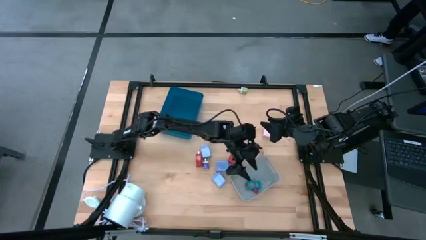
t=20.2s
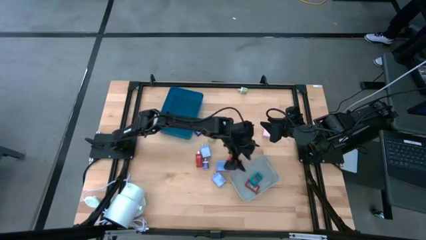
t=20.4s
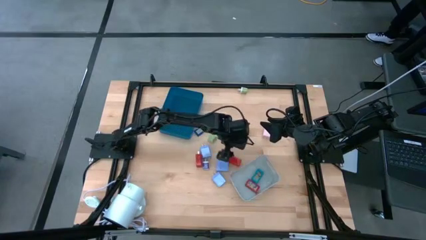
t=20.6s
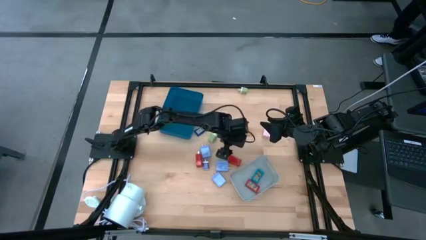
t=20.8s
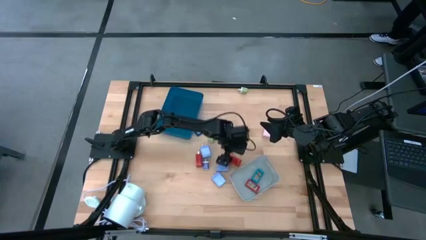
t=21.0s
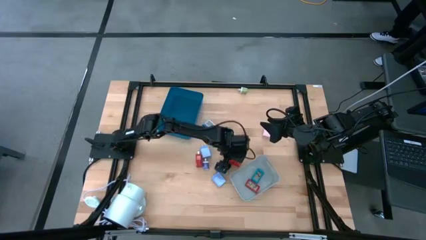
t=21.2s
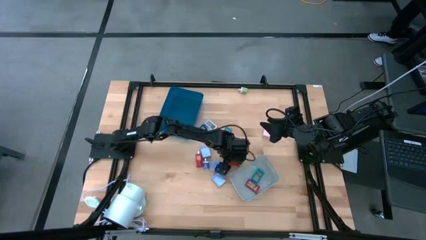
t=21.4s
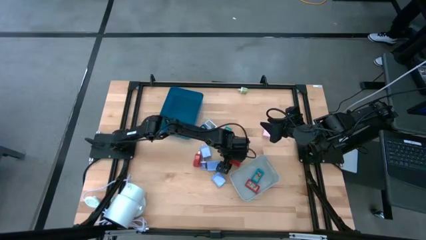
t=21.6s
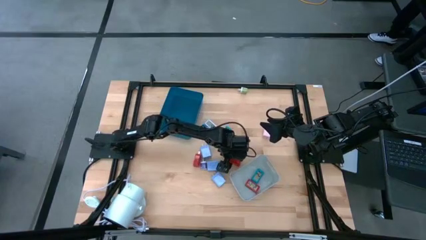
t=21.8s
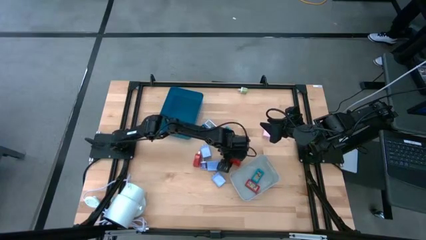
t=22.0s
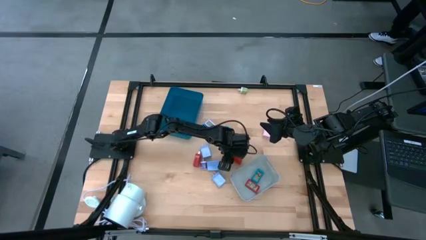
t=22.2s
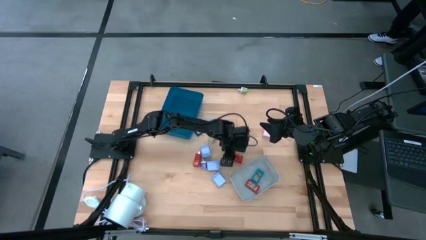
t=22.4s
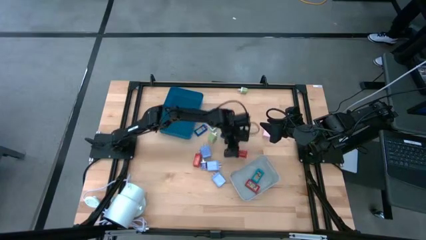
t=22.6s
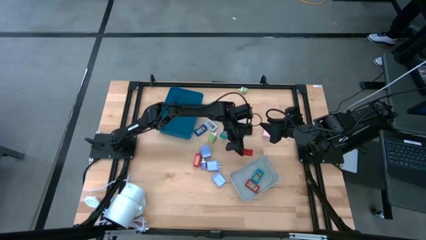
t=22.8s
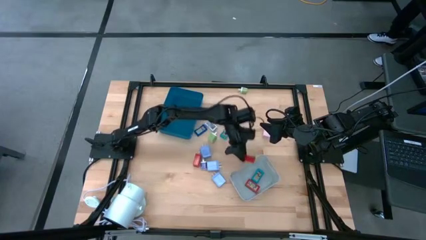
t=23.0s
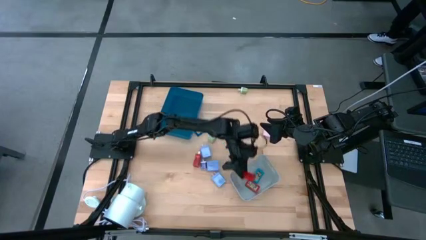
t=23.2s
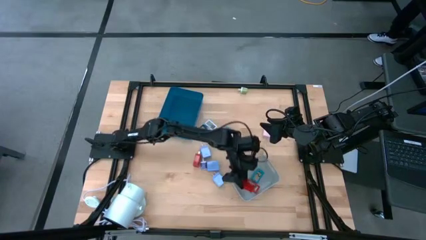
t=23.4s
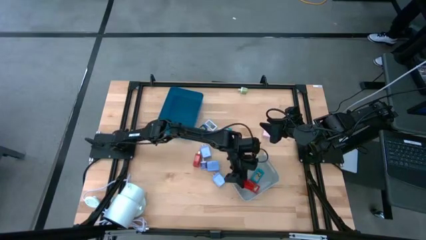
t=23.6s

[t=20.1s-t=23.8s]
Task: Pick & Place Office items
Put the red digital clock into the gray bin

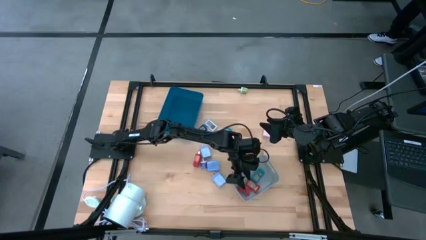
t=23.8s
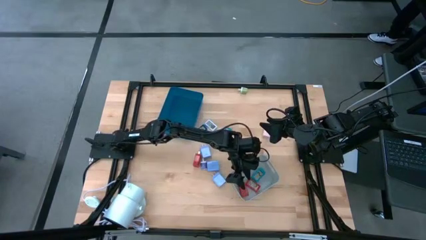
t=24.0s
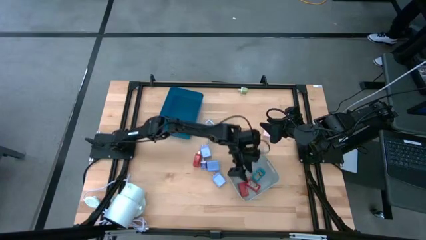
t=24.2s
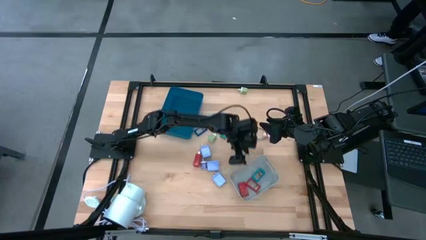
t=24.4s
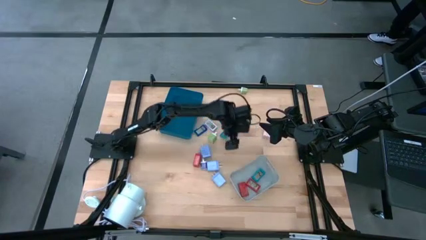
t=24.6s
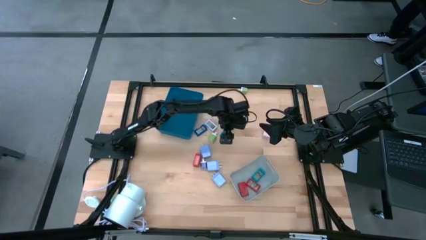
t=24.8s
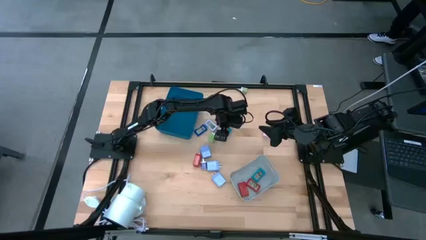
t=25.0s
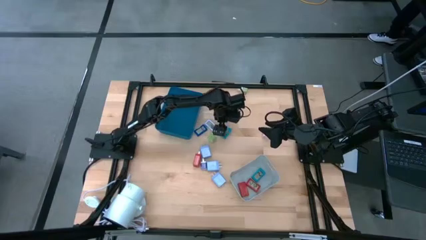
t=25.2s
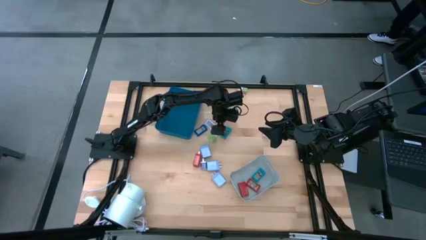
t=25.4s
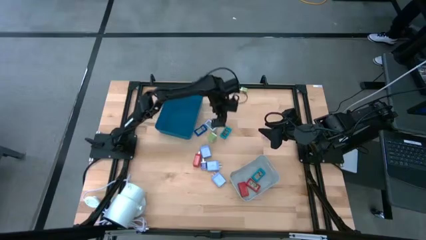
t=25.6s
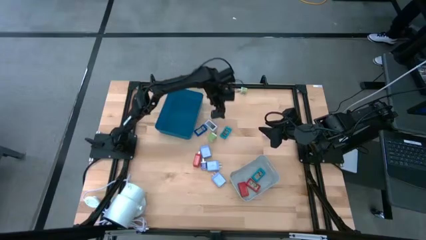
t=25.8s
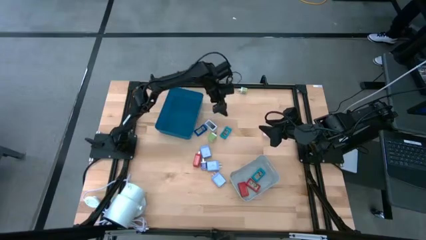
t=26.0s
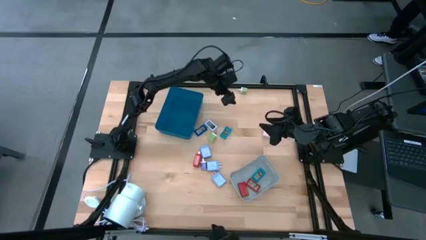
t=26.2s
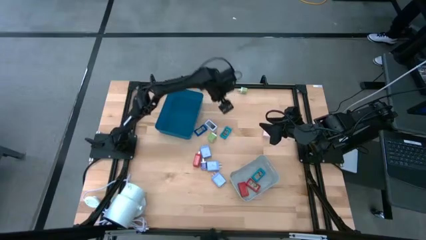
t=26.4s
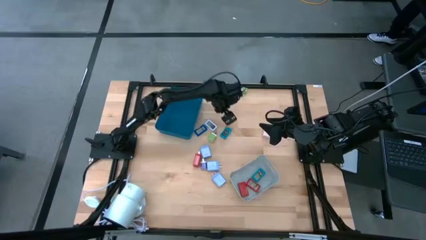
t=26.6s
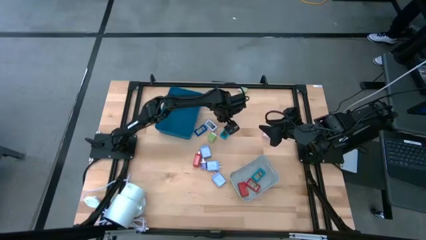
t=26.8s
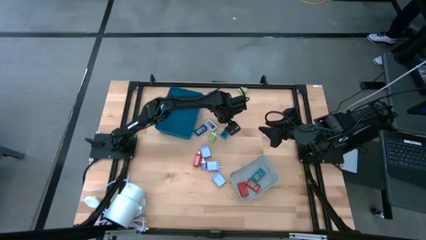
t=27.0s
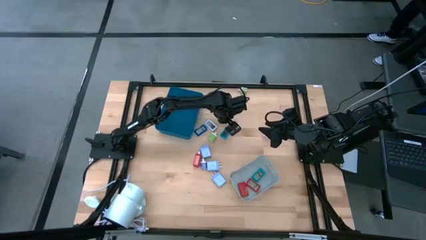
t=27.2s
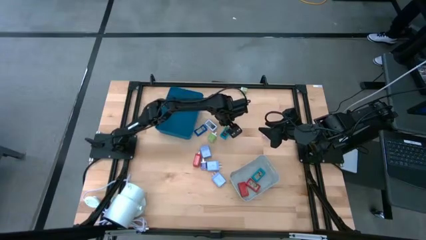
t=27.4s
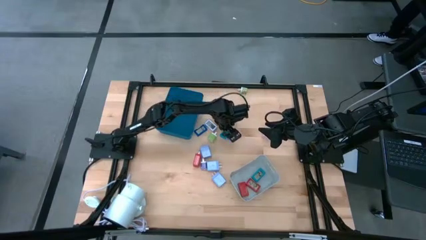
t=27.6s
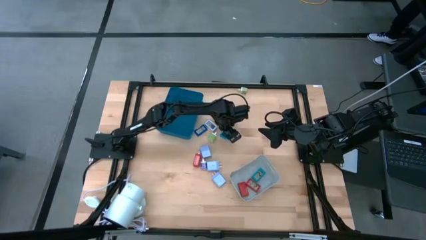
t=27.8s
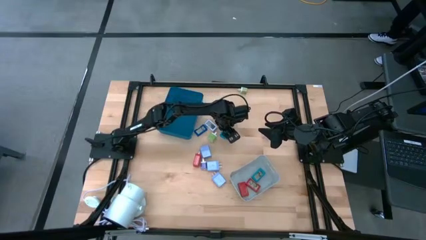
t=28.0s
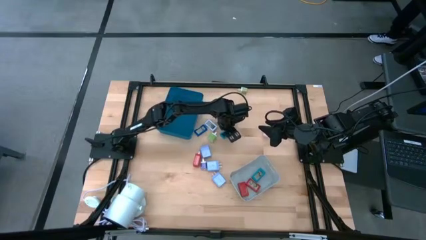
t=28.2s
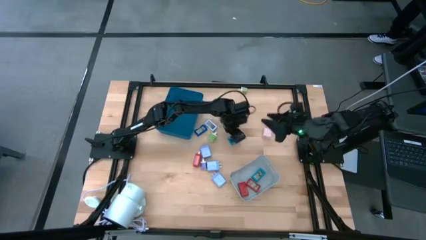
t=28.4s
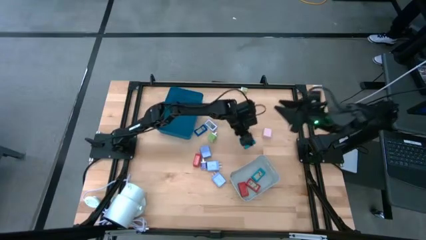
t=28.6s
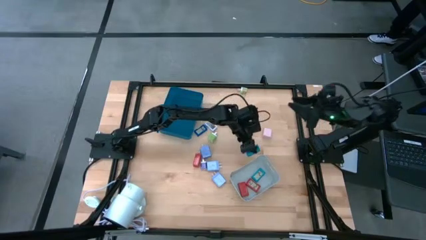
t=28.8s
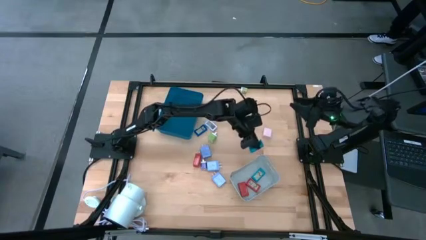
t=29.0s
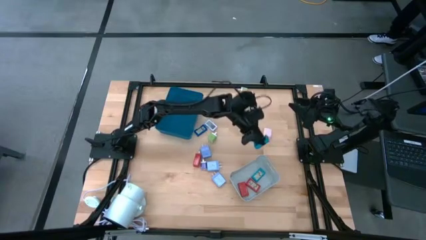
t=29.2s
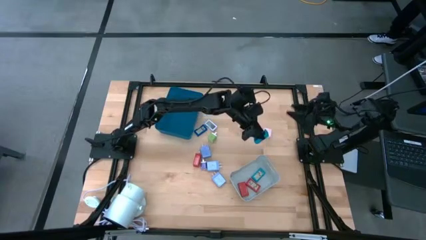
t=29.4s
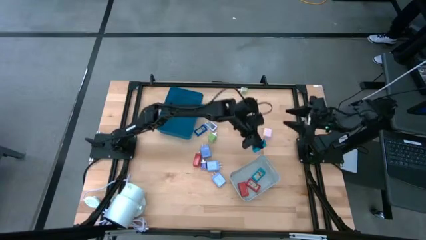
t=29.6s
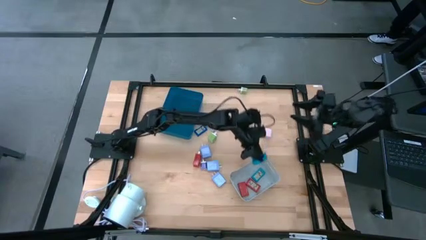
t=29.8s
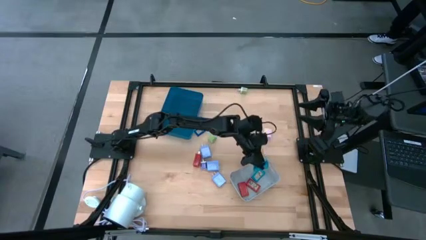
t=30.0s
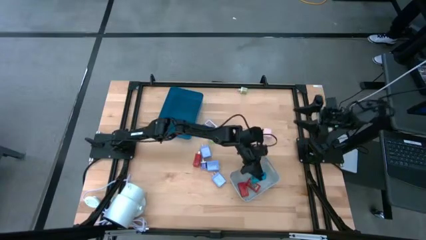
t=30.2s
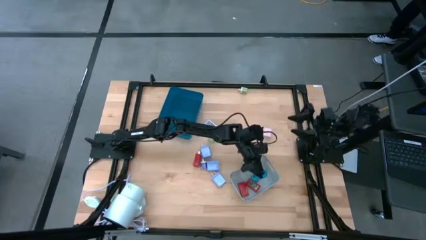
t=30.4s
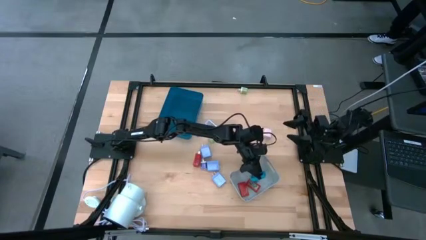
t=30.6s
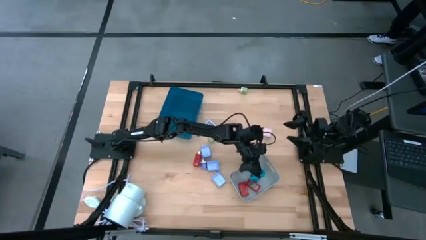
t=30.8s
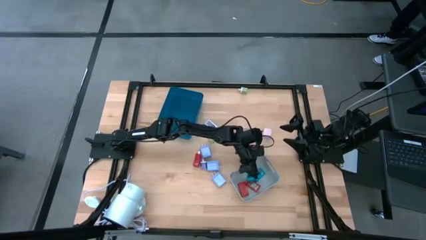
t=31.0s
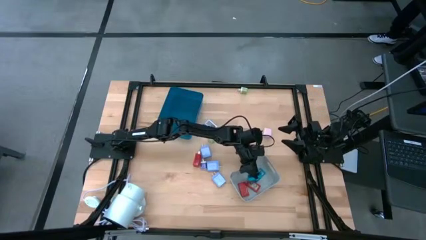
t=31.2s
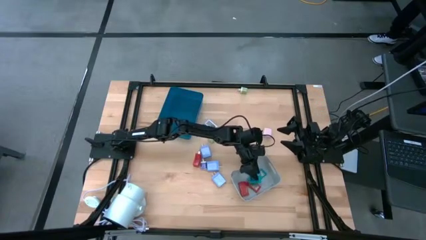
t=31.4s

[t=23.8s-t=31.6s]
Put the light blue digital clock into the gray bin

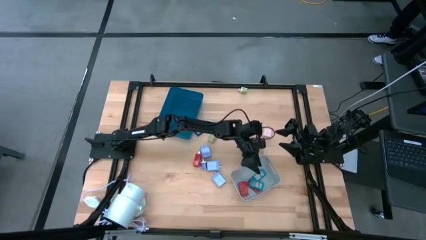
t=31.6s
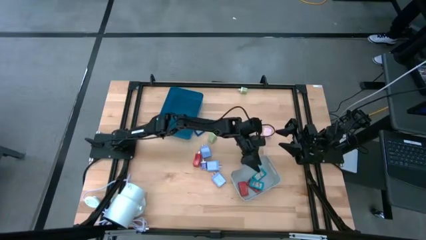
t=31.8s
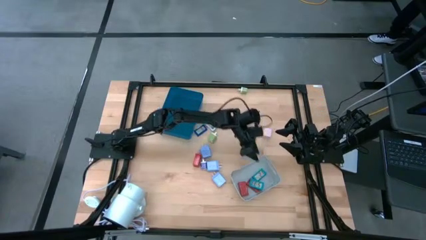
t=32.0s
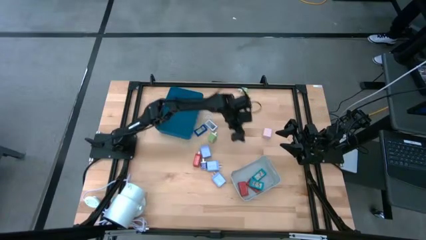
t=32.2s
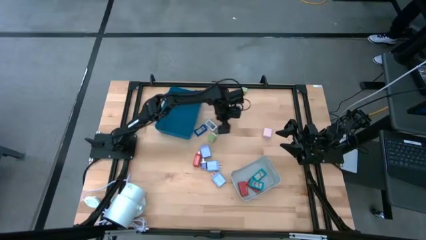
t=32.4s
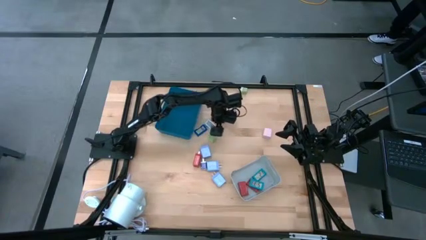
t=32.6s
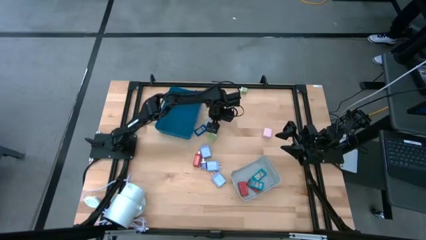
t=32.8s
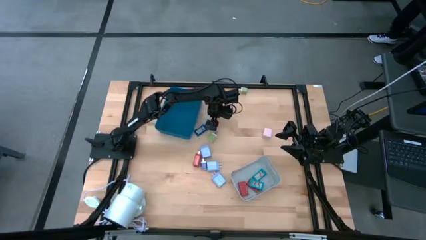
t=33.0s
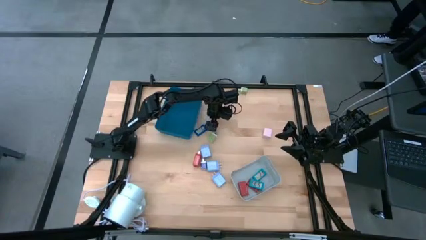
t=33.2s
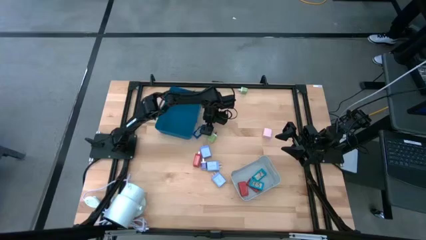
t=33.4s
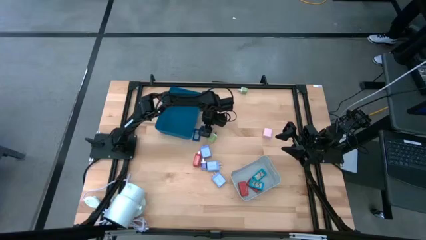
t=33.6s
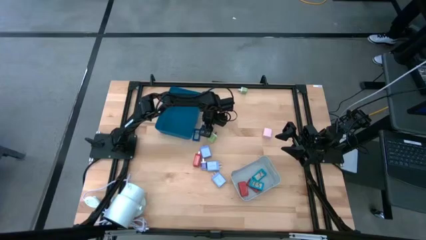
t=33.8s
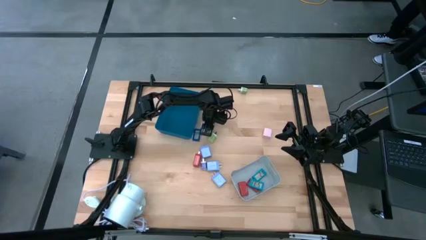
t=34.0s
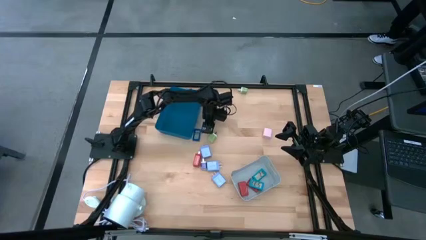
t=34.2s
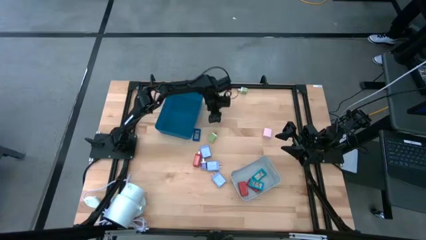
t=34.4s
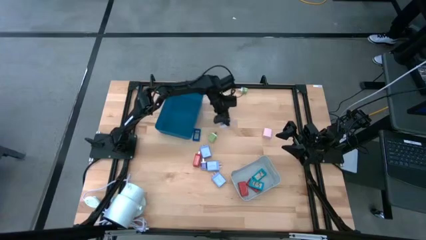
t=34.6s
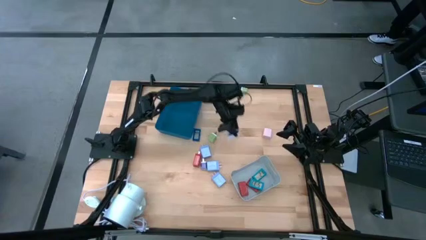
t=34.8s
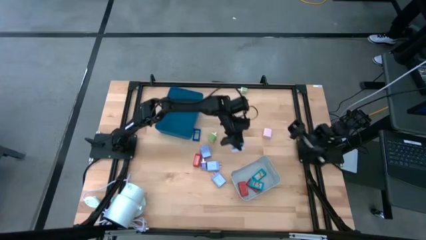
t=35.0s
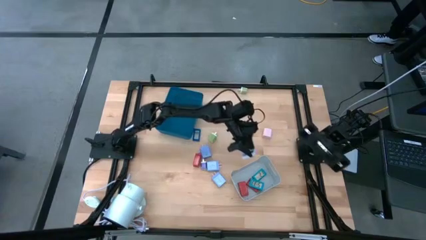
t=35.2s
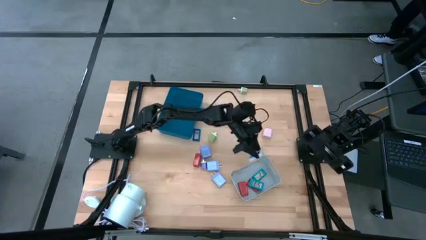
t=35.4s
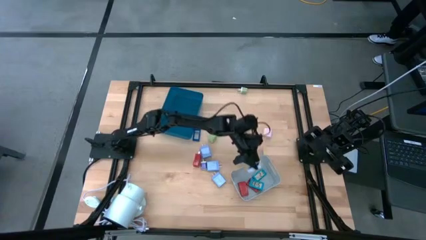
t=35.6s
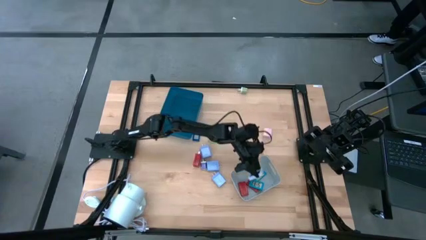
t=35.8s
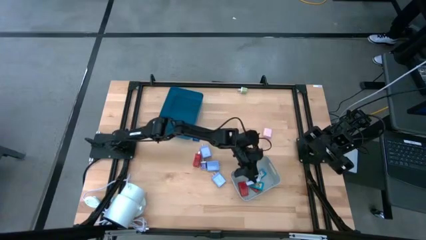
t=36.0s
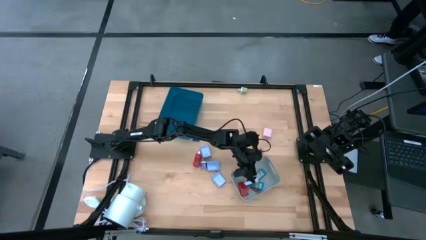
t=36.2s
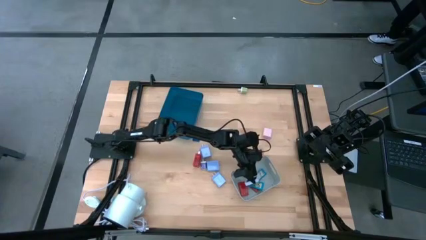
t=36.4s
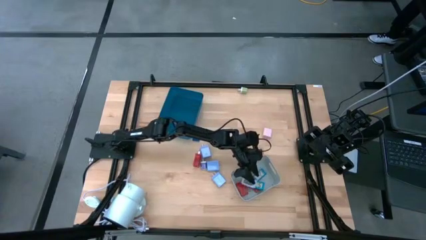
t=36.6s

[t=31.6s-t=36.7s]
Put the white digital clock into the gray bin
